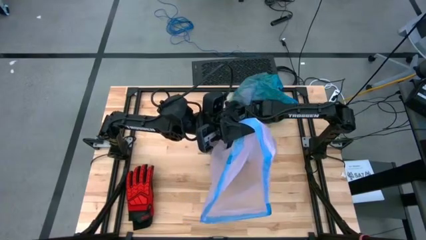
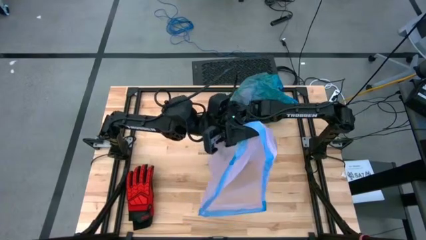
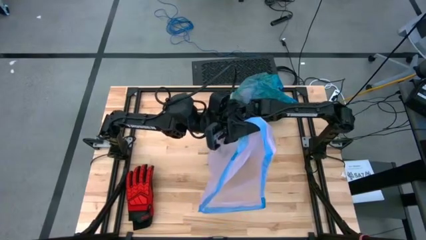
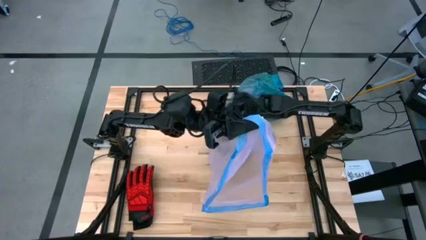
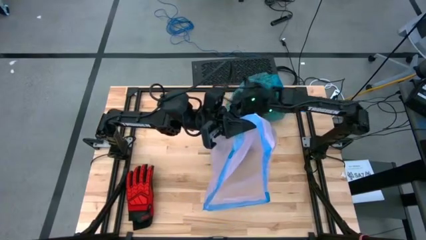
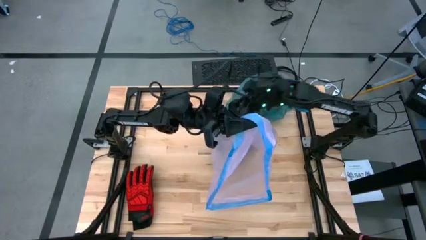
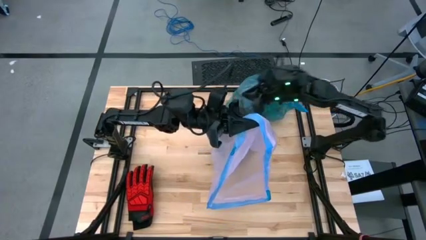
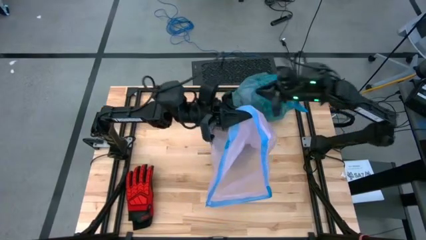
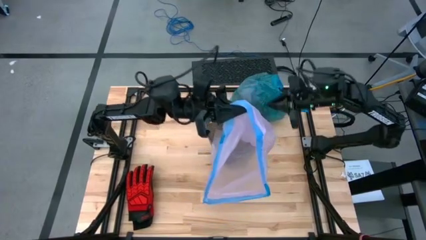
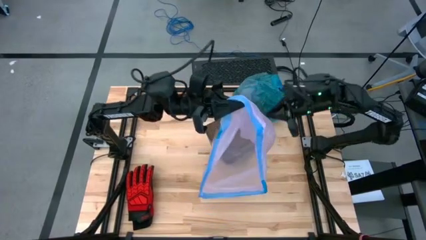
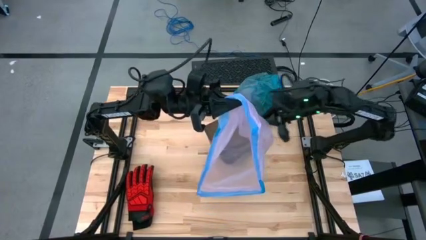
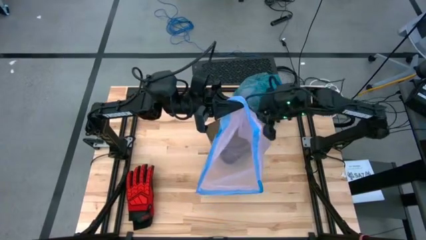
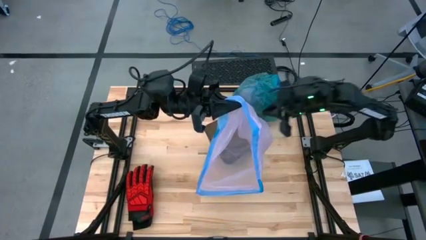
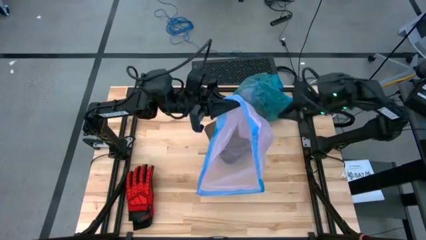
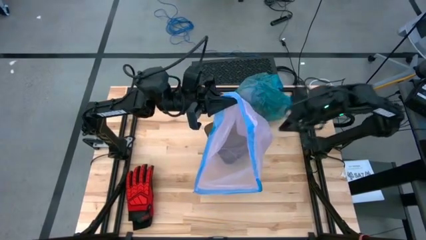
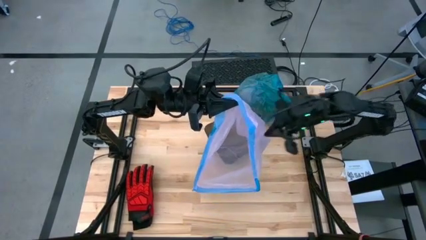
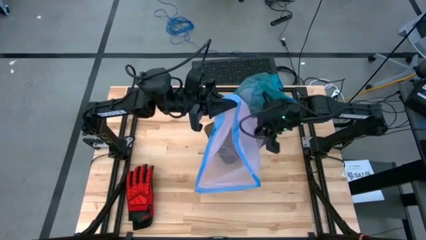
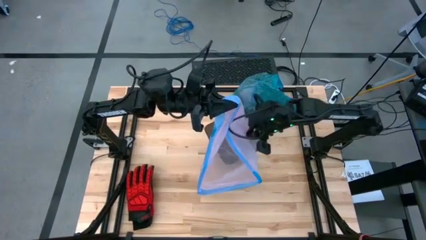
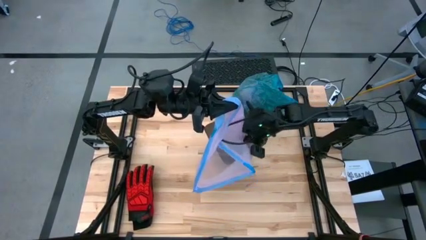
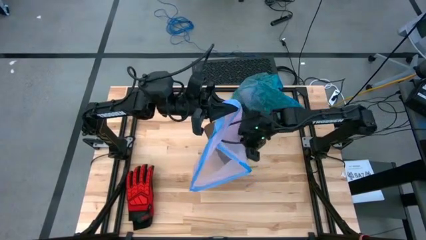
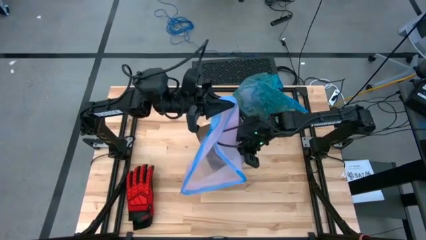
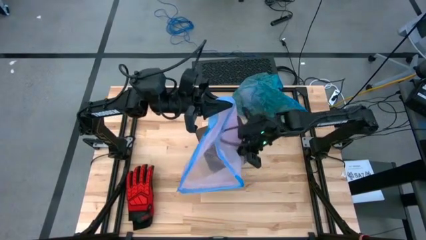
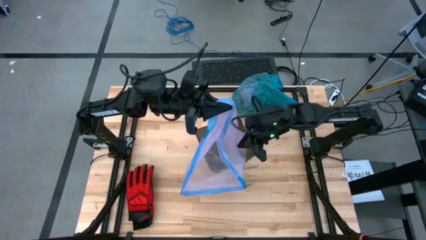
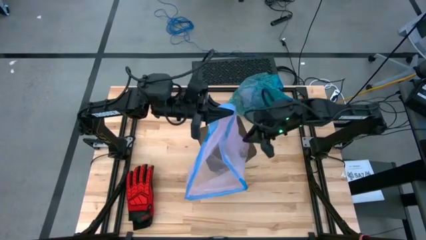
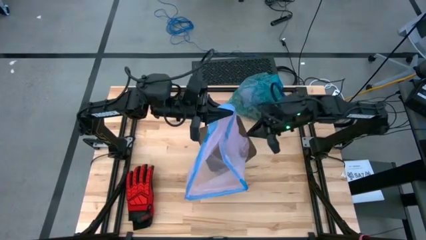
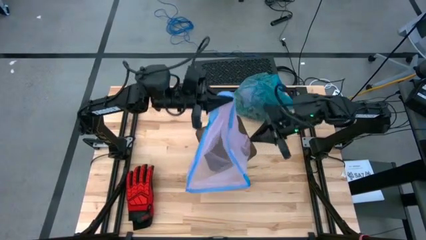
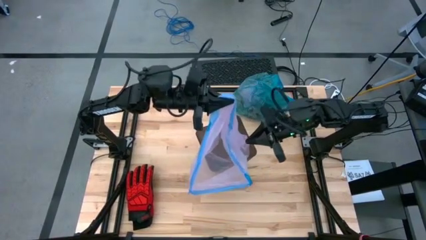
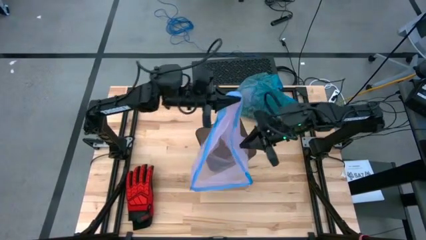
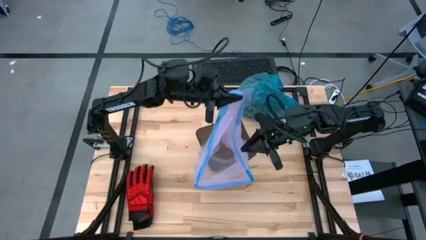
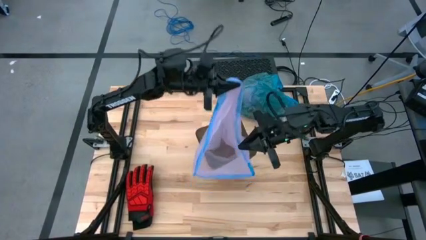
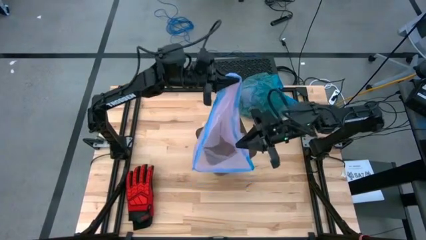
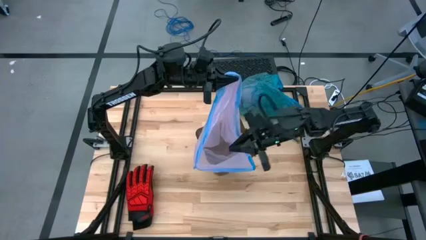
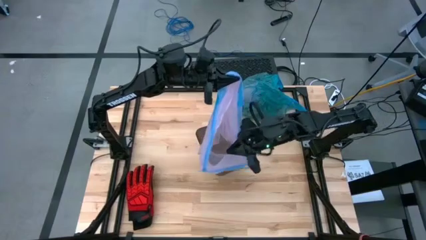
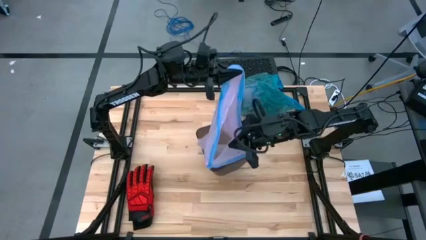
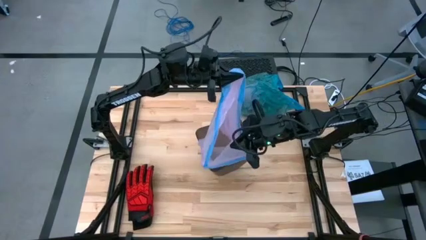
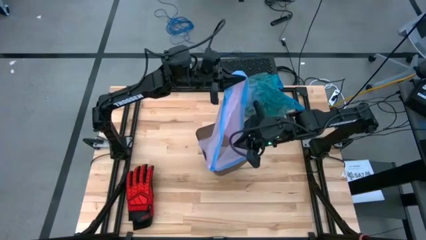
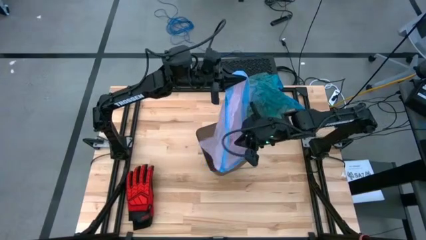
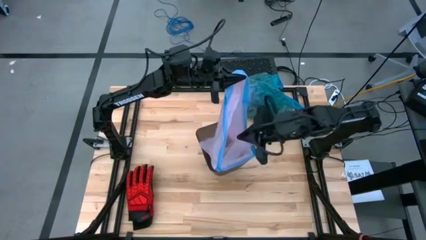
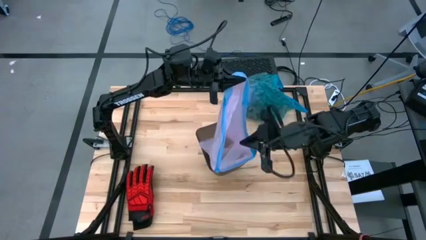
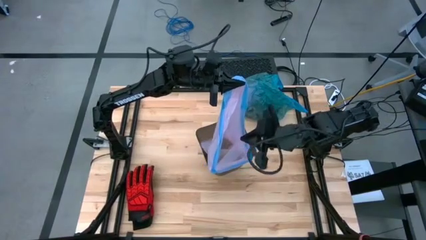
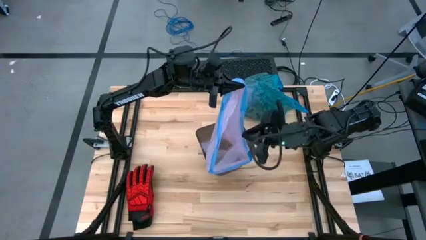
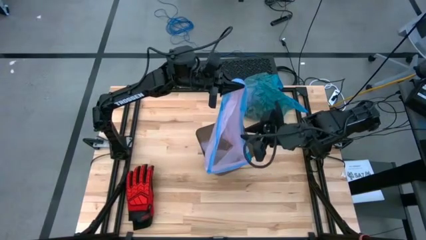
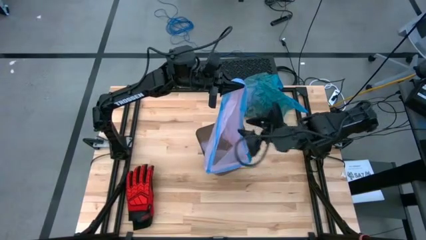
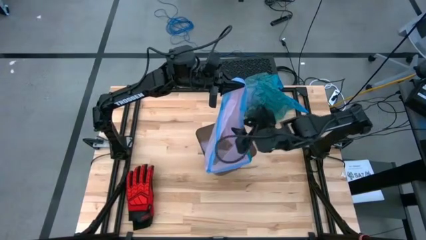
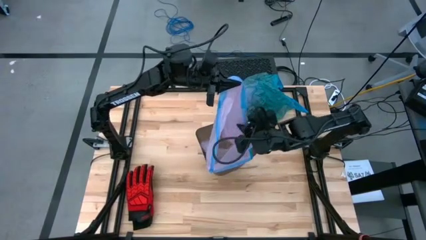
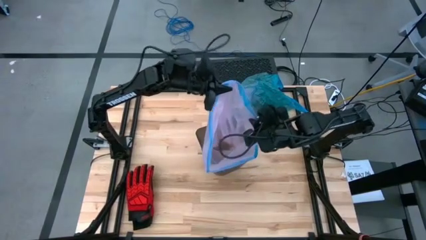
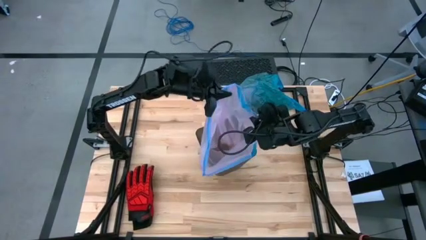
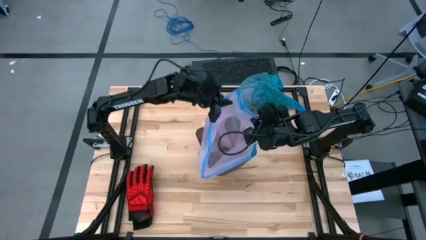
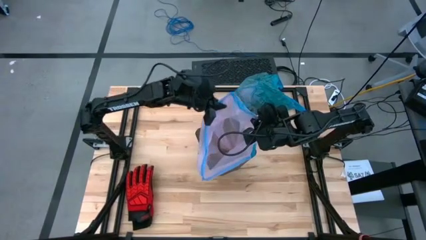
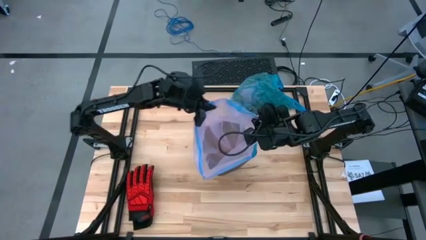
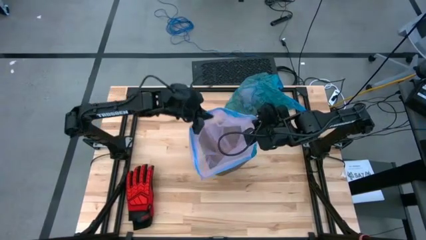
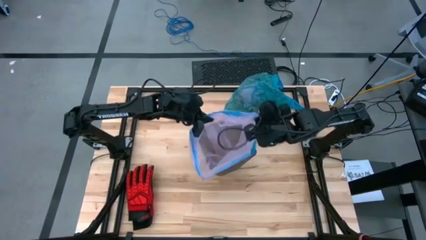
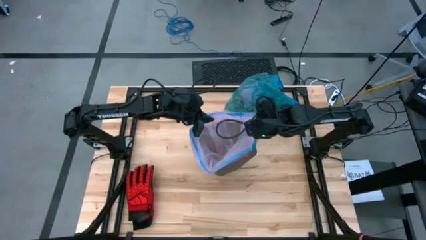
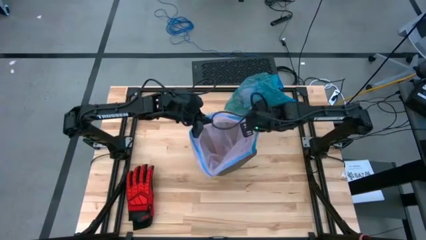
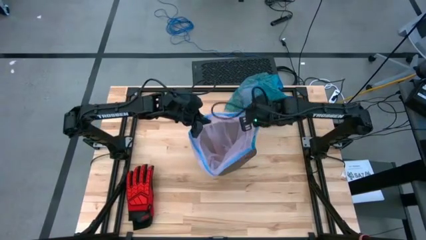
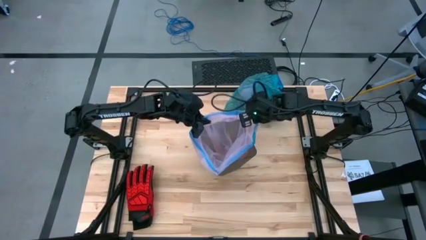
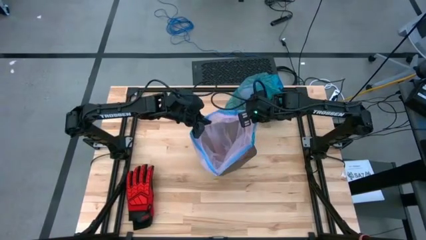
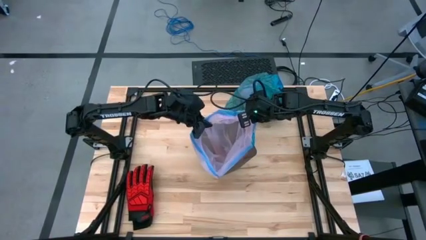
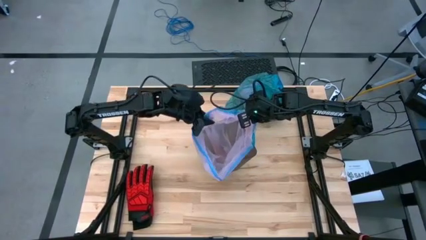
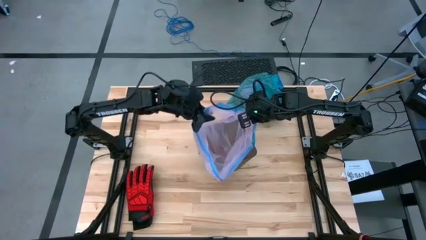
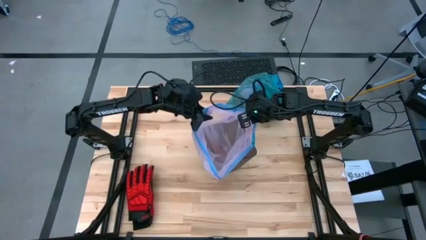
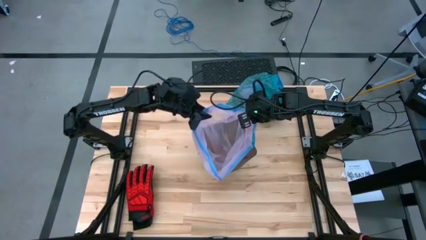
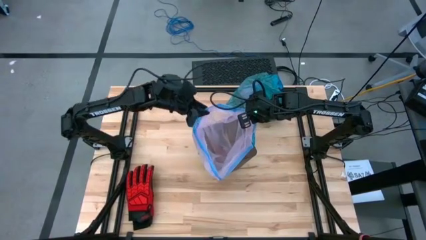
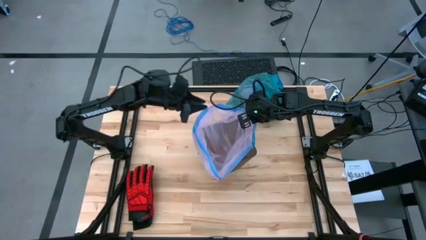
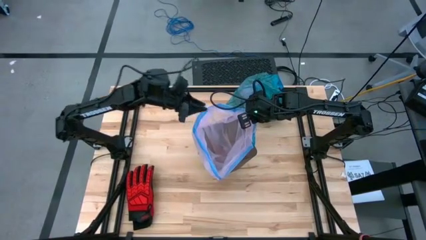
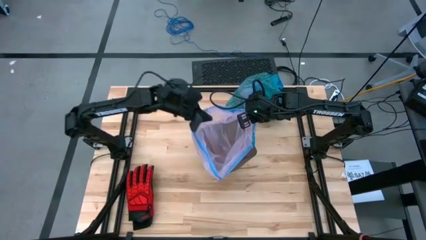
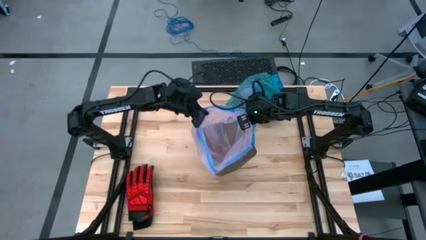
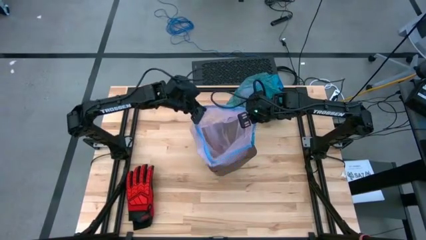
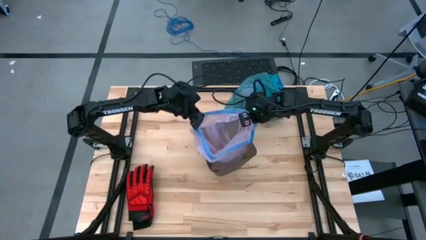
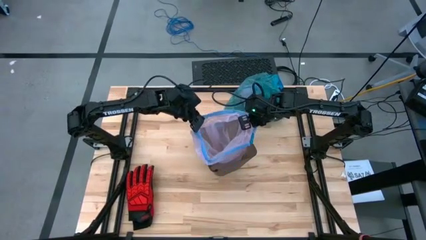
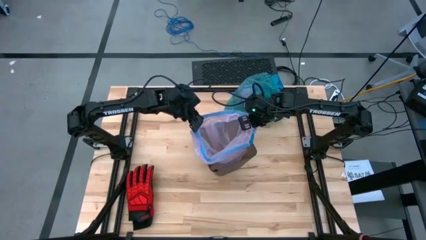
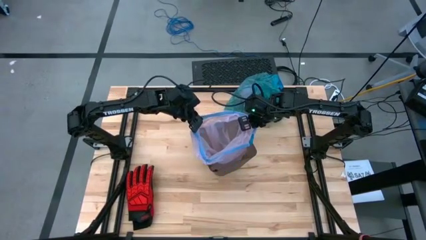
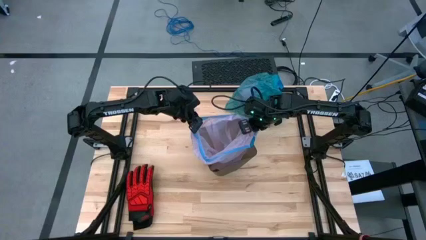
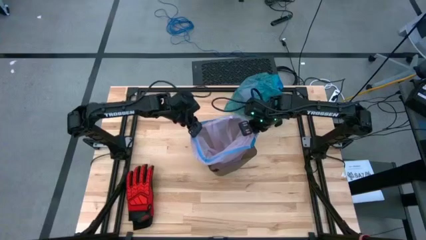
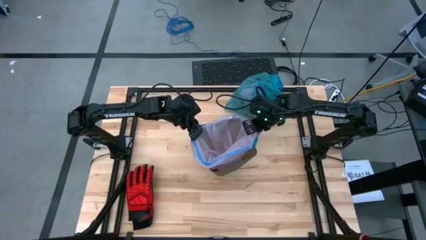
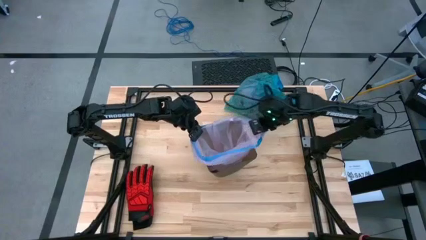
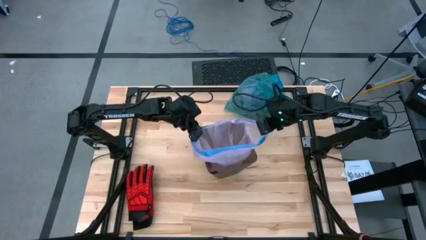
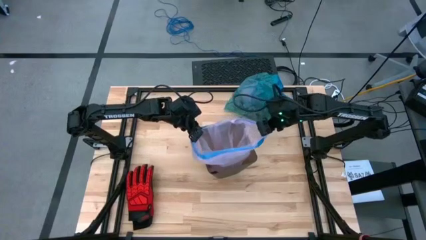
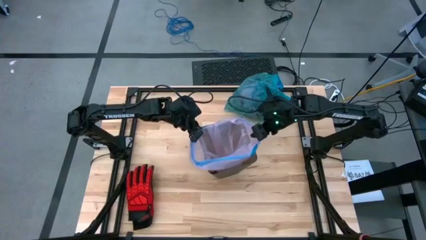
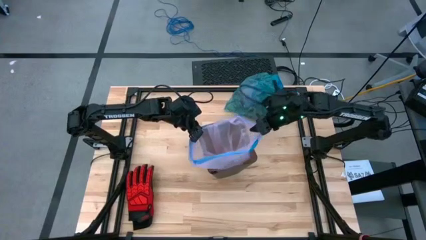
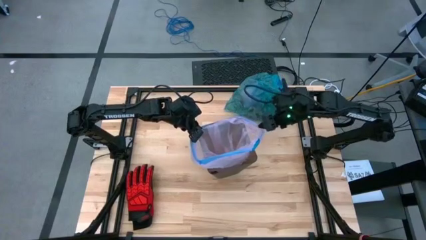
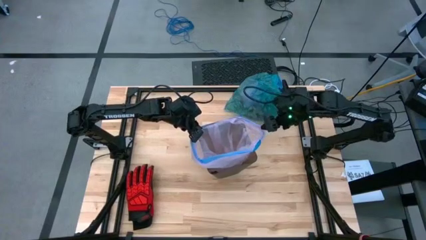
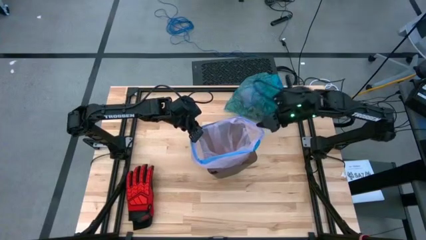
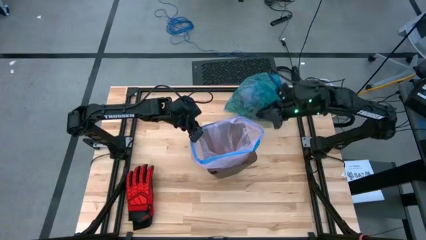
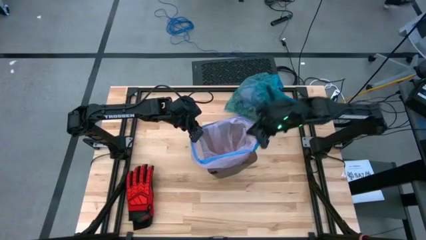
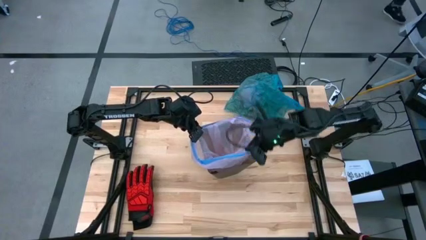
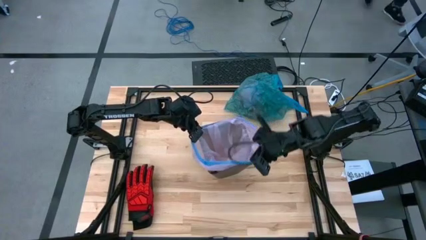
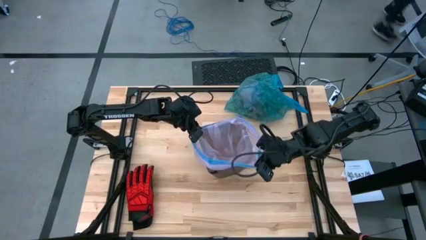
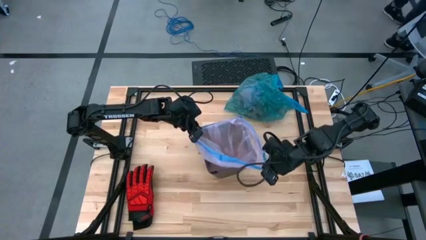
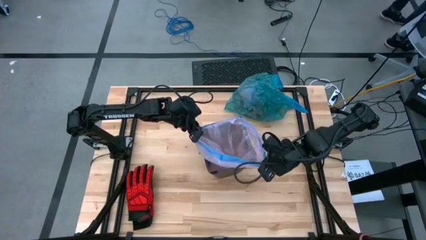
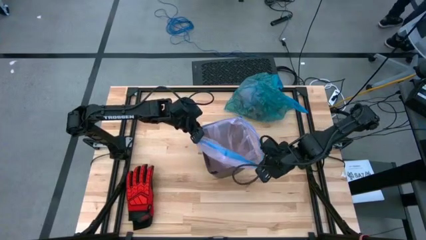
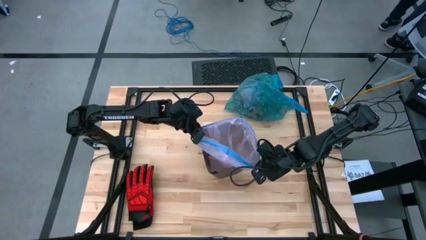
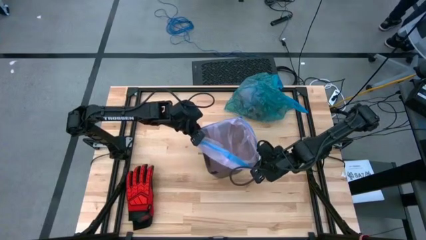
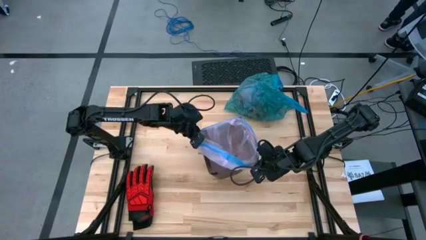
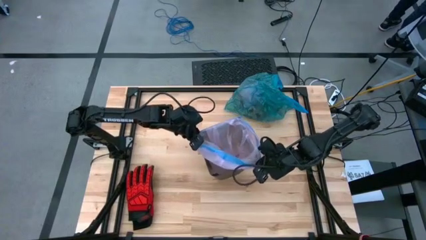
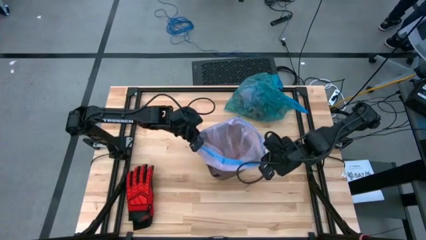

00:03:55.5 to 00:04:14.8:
Task: place trash/remove bag and relplace
Put the pink trash bag into the trash bin
